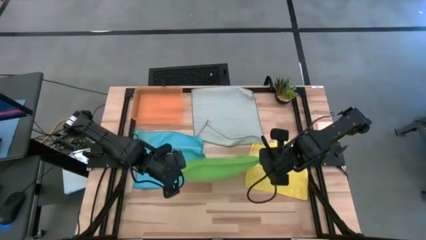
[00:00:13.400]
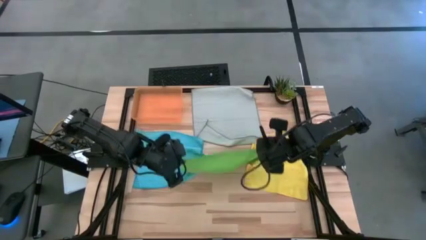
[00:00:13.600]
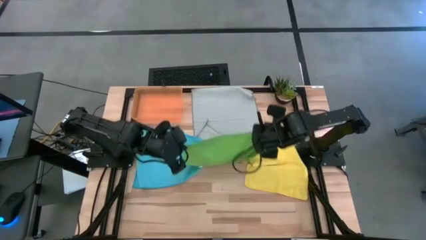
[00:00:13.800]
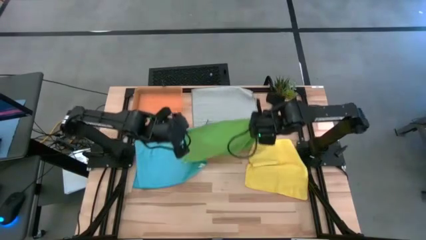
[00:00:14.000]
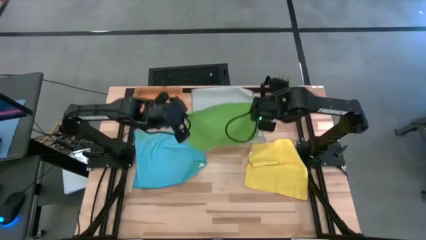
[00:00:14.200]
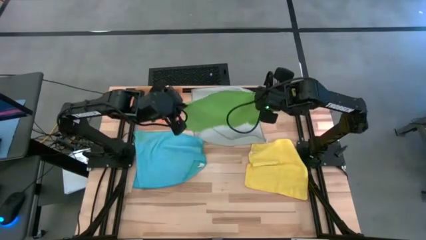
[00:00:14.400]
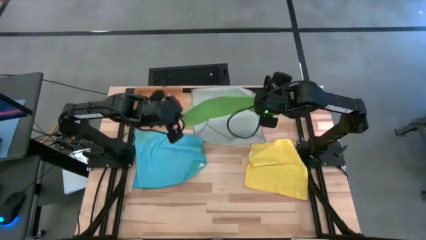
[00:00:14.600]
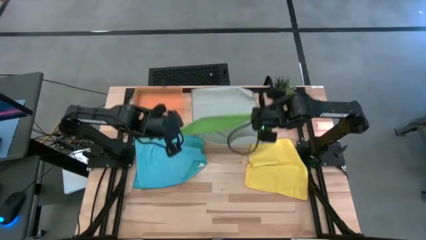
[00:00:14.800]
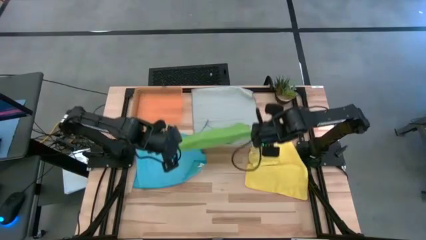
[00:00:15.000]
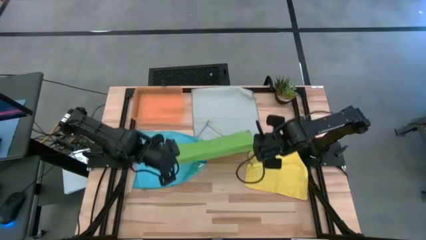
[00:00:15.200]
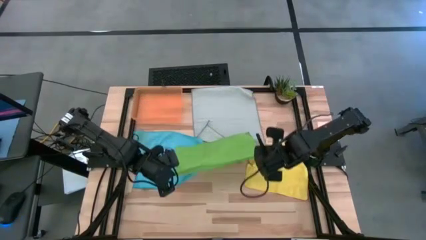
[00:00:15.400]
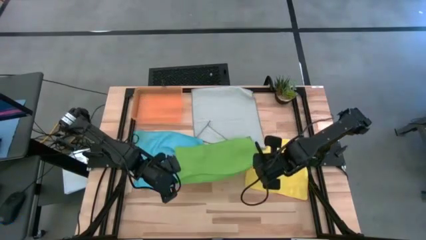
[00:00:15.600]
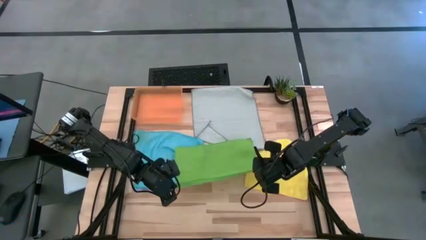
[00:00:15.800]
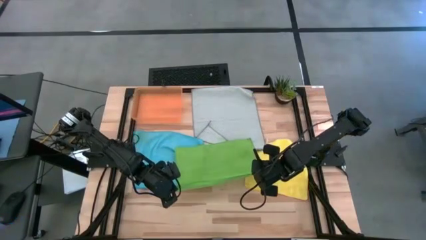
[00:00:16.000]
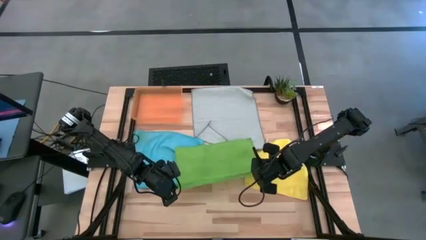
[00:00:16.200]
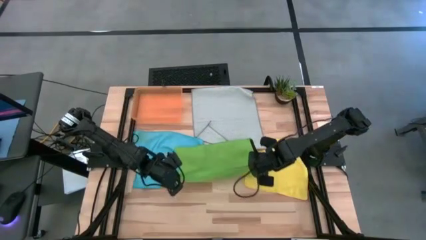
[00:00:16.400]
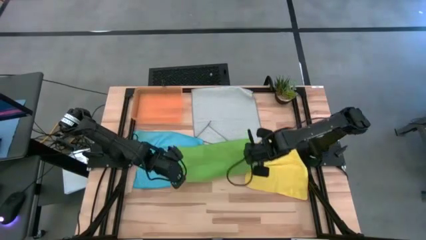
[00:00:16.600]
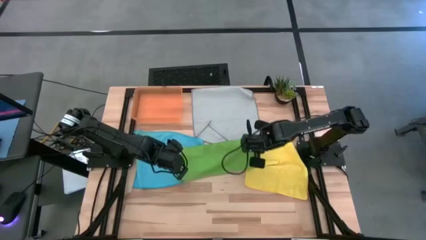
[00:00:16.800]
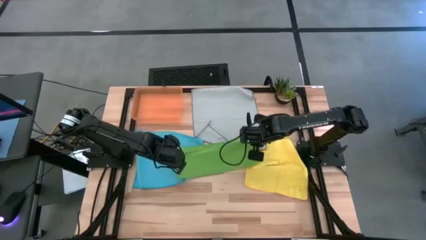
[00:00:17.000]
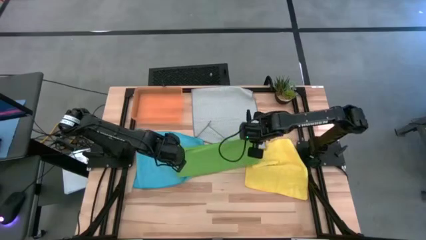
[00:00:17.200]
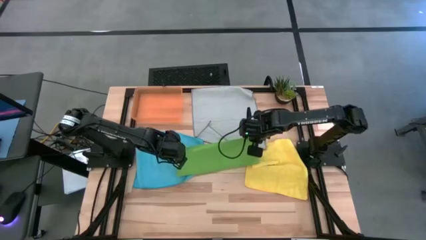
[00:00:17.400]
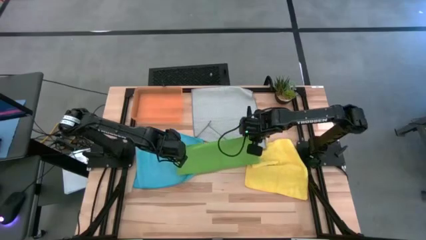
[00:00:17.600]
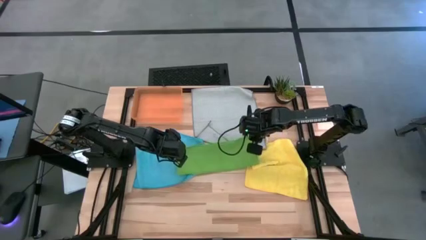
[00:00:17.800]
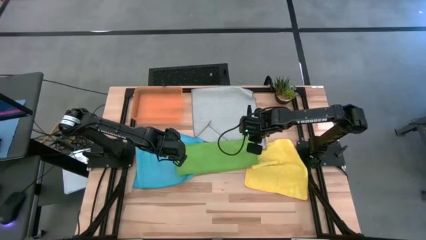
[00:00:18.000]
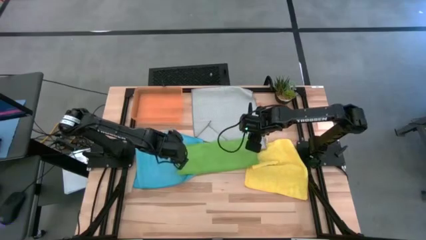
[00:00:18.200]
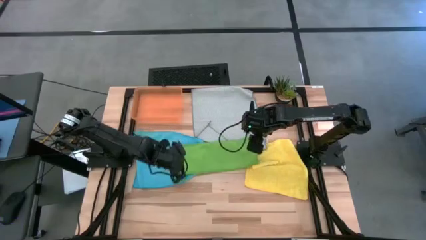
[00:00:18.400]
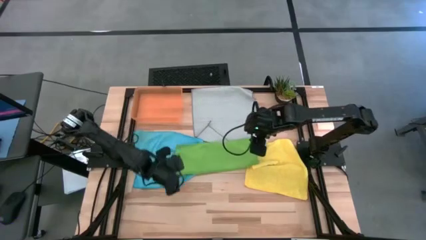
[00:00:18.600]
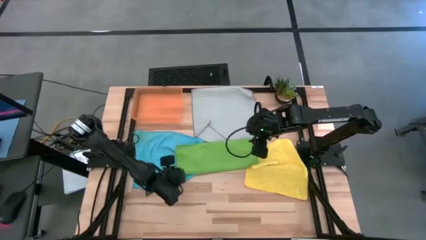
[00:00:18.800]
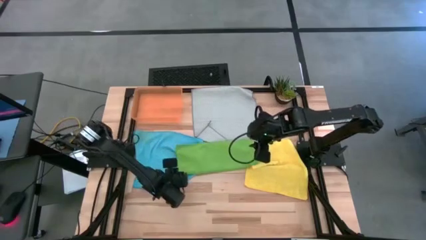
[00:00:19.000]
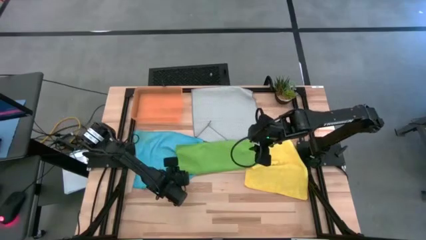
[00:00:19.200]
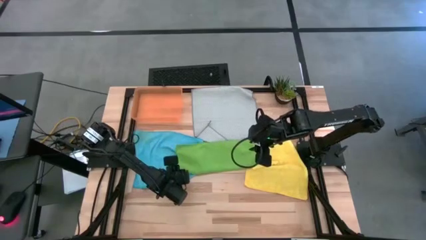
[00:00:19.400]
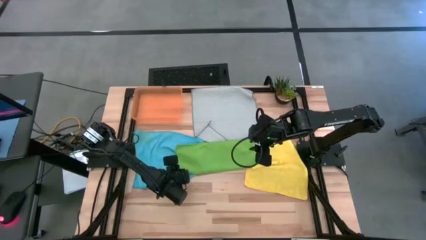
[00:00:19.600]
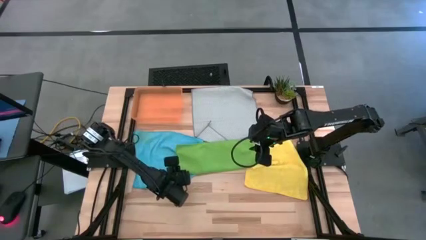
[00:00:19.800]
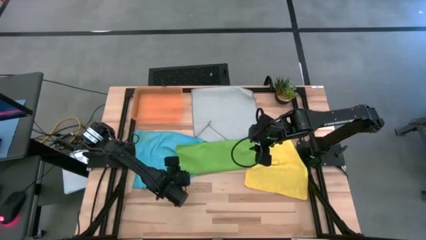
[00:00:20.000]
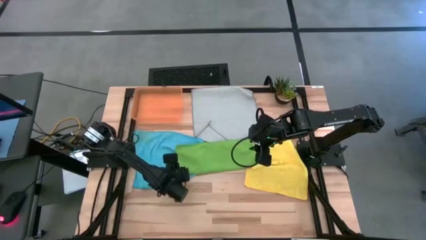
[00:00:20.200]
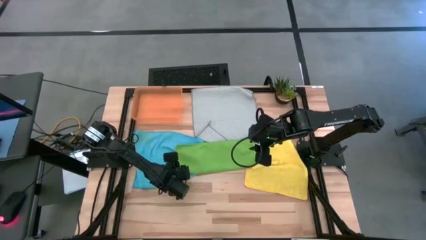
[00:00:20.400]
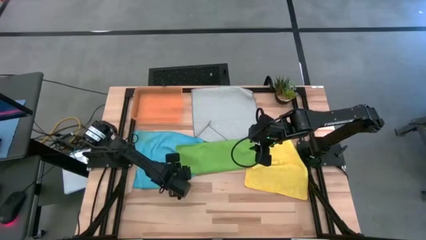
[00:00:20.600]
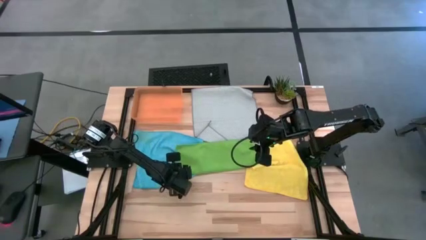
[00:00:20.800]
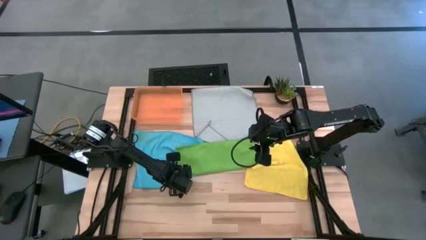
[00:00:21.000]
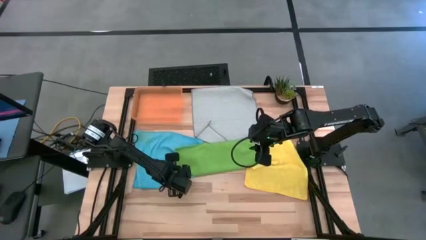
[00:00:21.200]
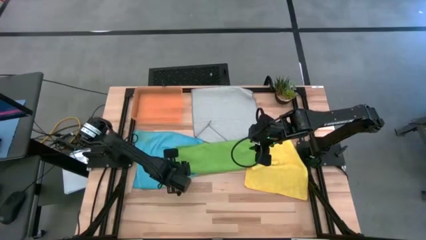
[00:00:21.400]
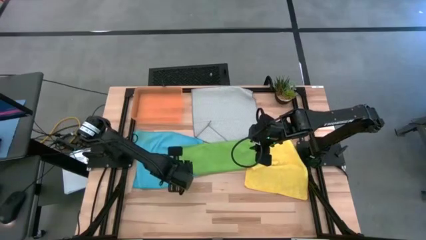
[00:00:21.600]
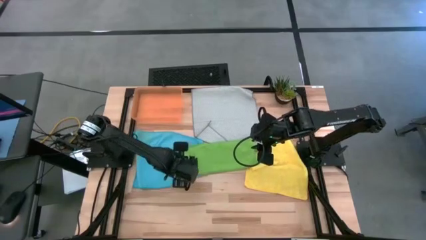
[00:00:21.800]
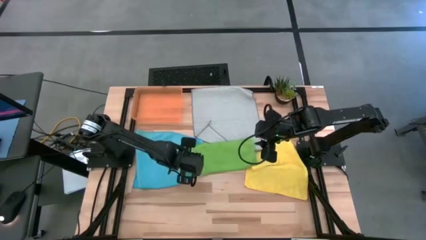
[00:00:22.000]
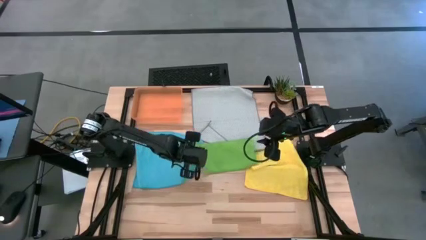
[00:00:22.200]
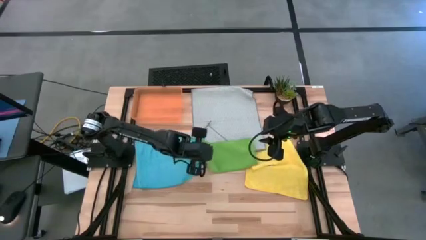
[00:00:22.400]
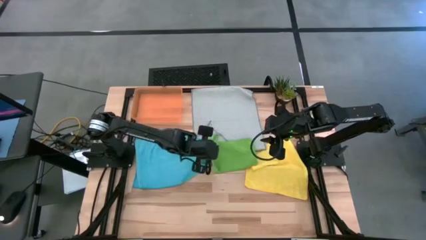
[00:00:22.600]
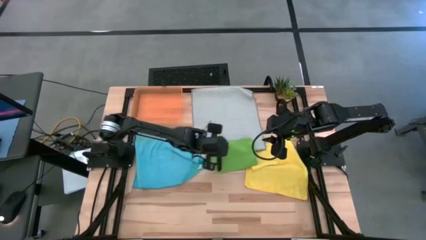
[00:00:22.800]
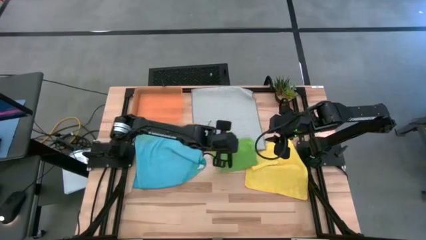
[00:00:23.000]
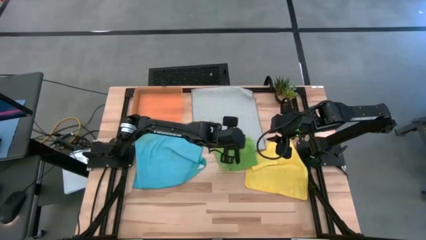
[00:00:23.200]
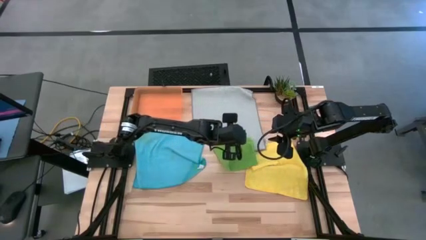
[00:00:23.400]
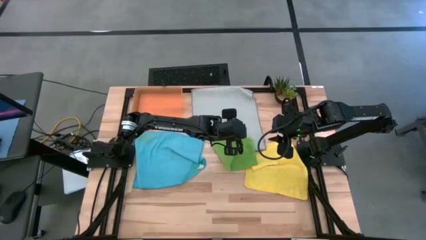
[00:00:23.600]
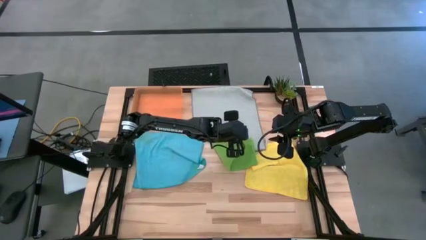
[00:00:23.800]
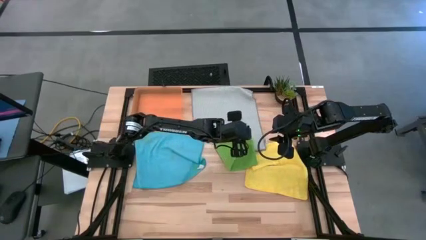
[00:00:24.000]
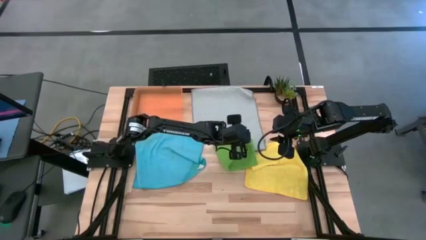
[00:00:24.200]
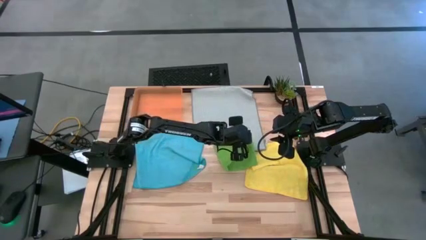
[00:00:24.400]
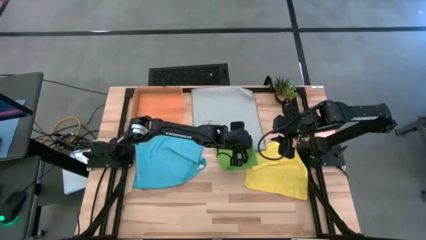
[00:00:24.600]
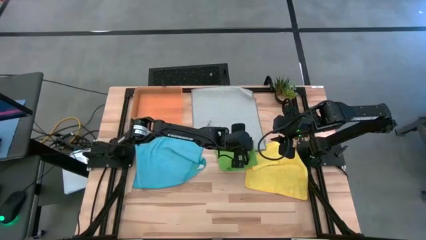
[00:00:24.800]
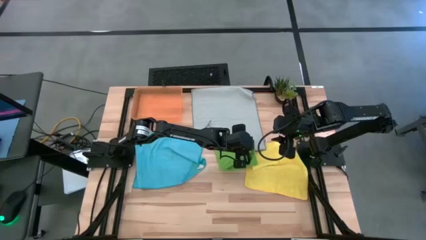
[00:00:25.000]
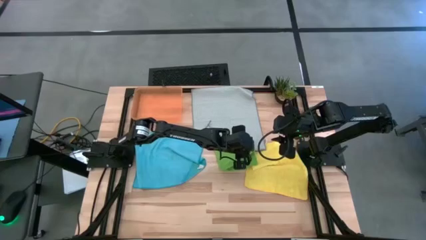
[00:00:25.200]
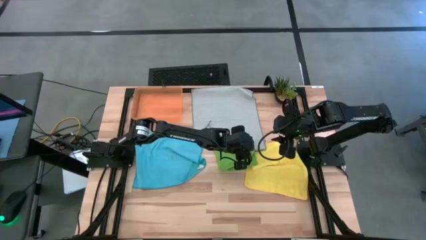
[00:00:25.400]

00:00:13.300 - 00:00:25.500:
Task: Fold microfiber towels
Fold the green microfiber towel
